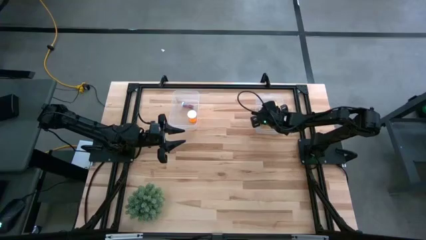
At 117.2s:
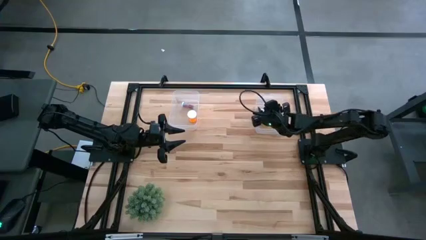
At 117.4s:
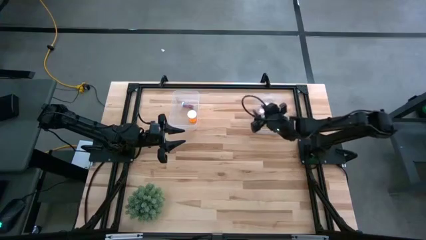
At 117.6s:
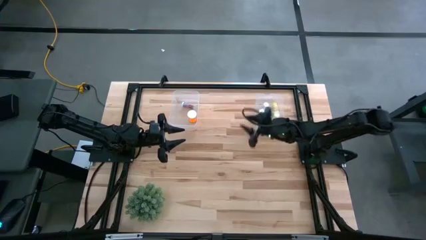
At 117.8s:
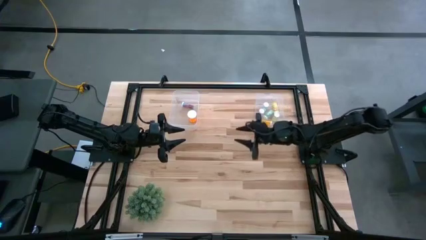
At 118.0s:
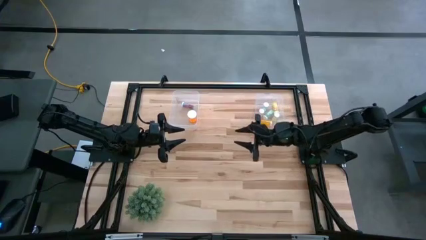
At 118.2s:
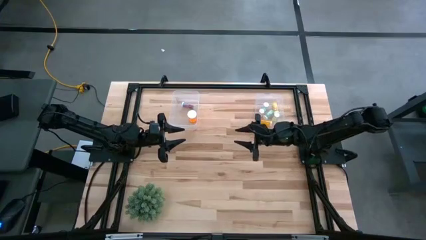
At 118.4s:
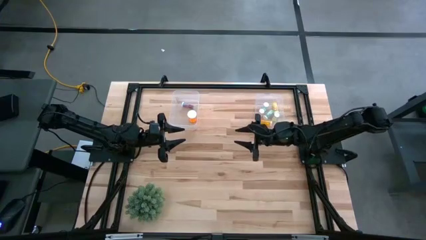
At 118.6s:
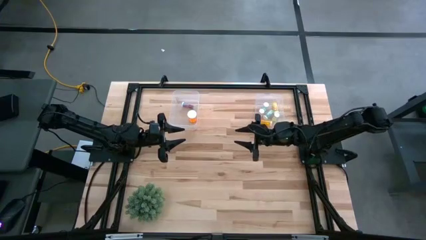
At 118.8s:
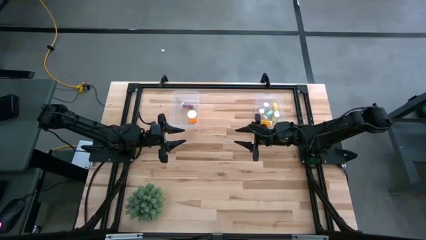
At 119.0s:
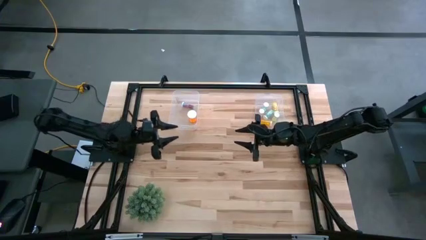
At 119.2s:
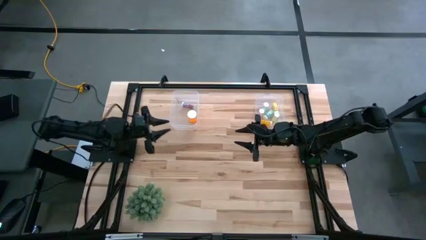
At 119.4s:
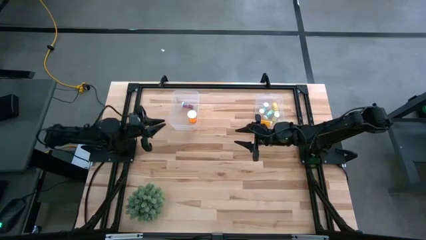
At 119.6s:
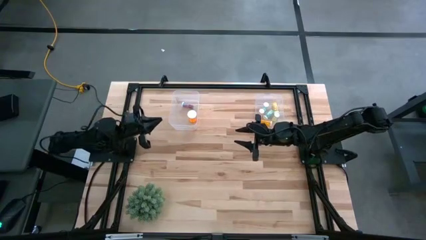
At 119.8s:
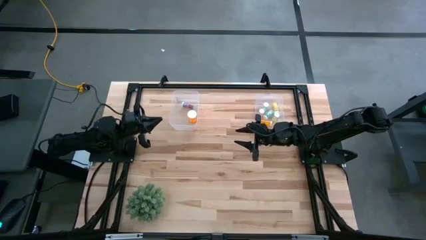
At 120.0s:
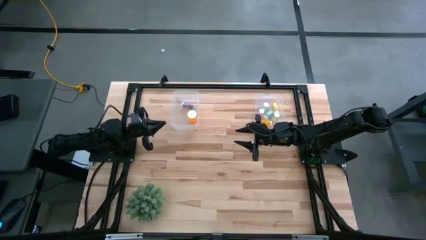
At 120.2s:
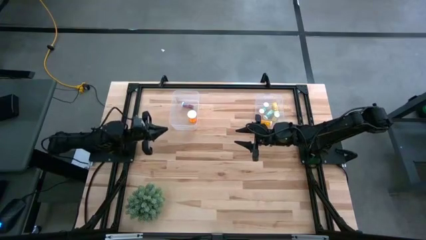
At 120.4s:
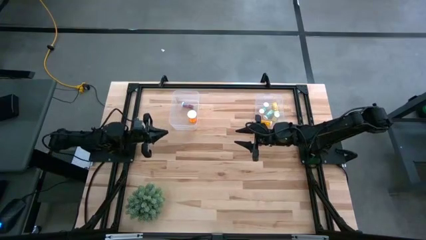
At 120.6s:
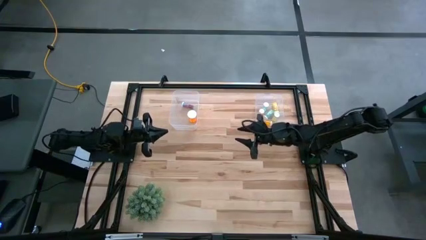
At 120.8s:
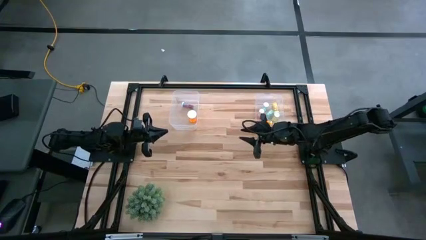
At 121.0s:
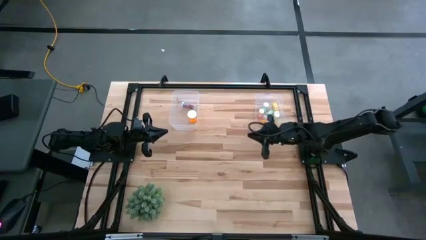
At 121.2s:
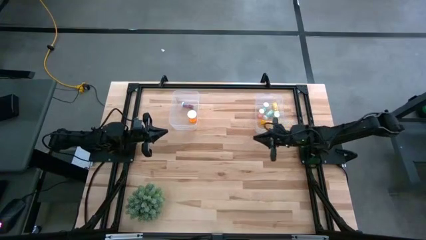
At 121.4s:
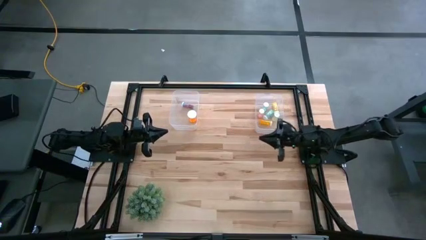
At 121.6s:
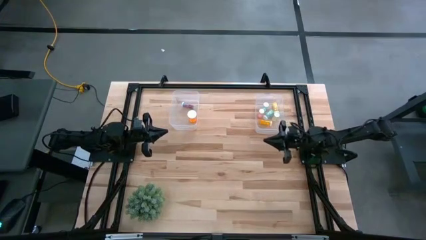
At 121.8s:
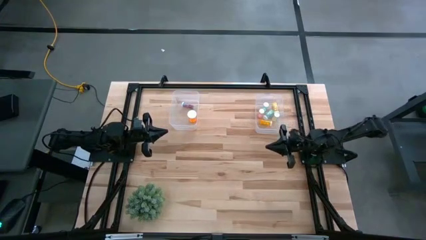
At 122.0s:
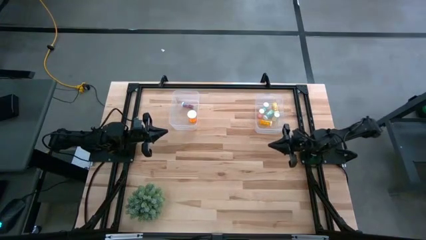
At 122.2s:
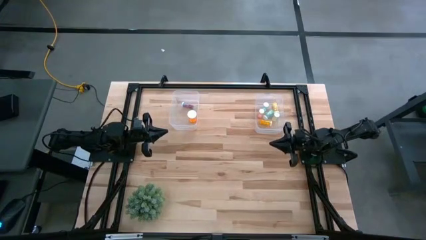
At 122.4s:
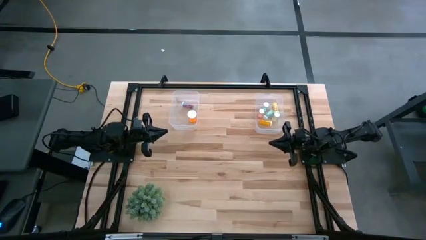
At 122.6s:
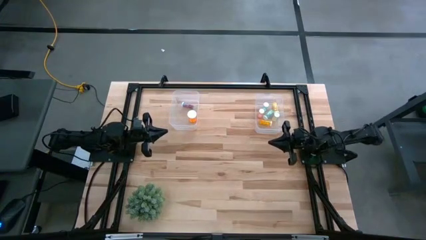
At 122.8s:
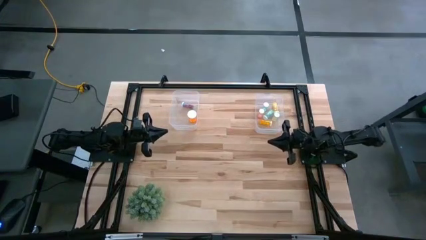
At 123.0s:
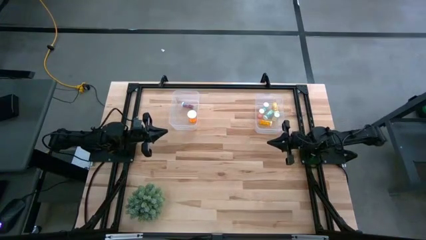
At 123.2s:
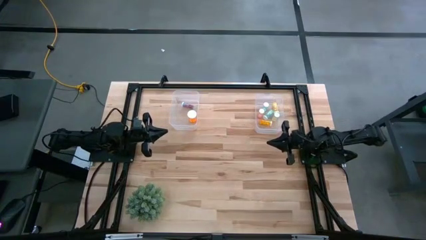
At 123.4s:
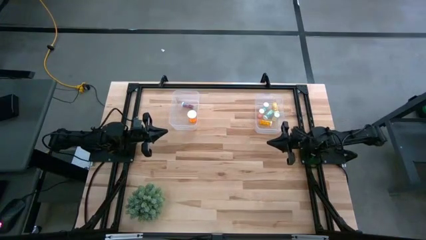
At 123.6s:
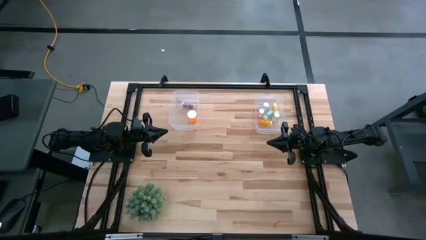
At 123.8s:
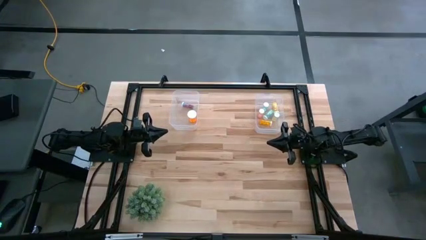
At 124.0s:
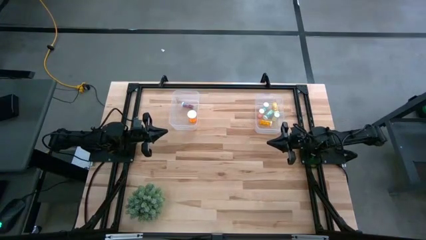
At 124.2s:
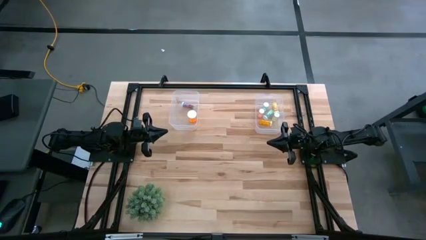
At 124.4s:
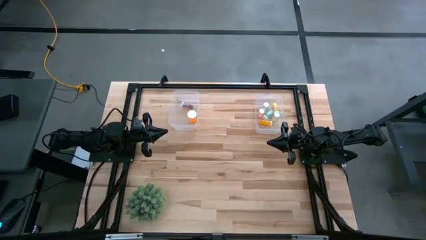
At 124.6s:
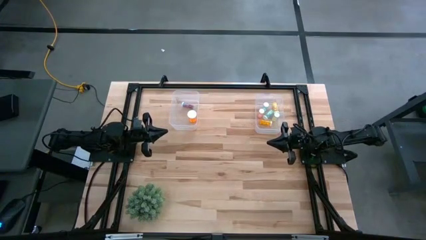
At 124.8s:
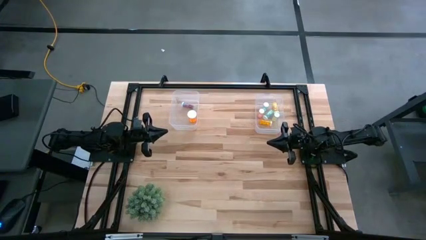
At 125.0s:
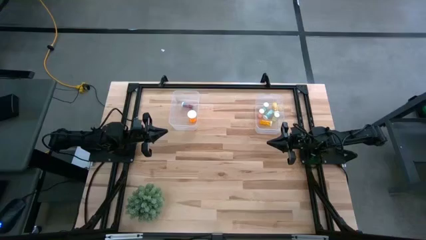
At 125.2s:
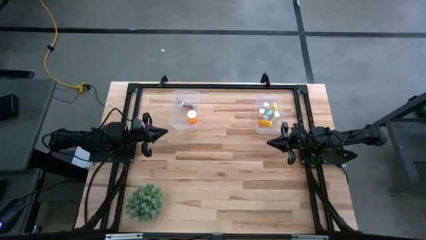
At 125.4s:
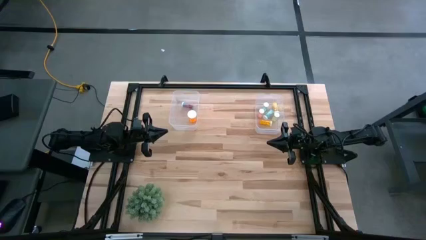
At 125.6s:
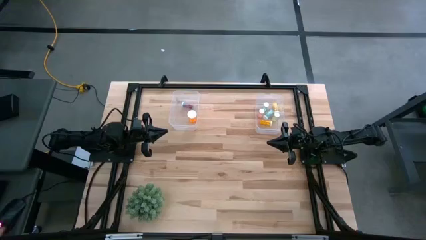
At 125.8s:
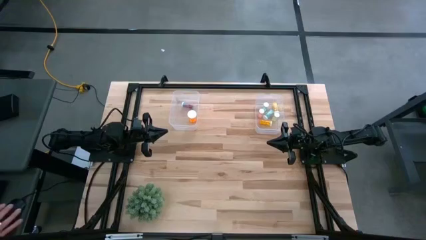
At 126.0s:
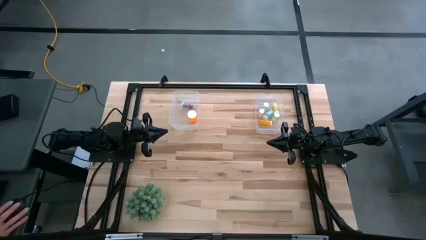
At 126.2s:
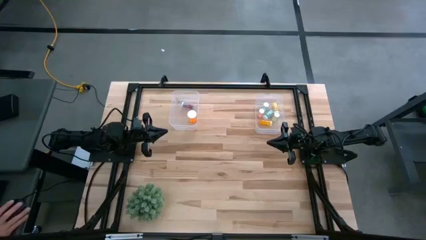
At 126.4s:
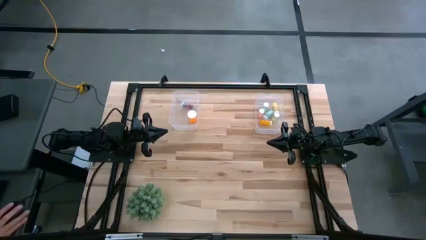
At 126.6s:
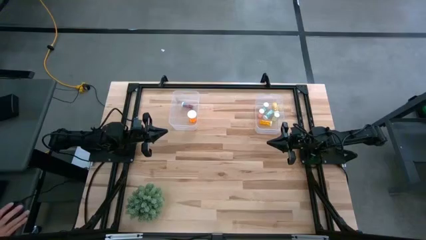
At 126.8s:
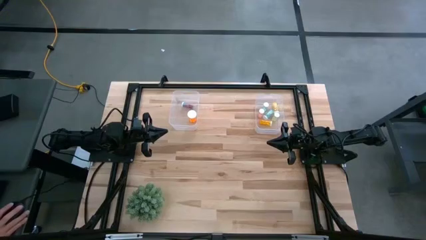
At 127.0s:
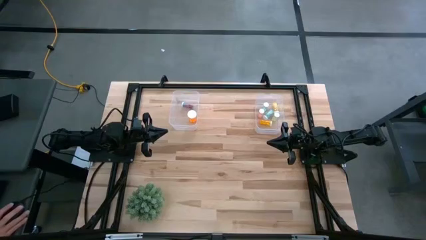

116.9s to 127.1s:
Task: Pick and place medicine bottles into bin by pill shape (circle, oval)
Return to Home Position

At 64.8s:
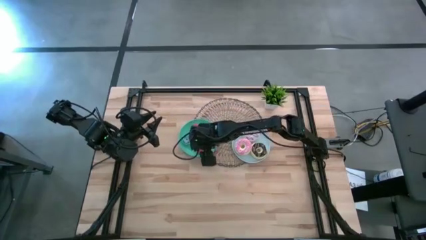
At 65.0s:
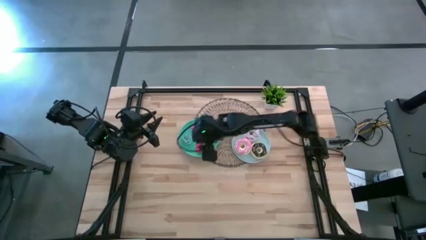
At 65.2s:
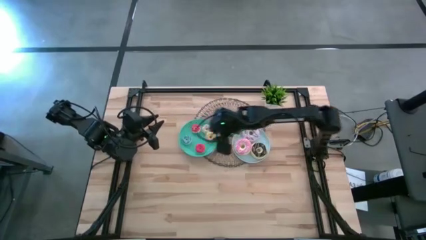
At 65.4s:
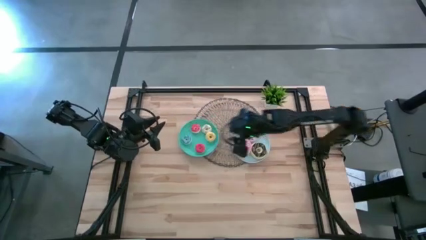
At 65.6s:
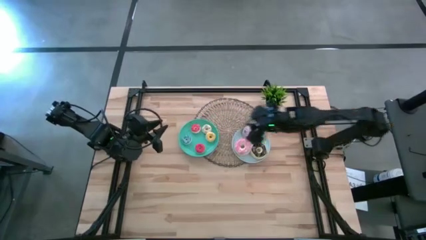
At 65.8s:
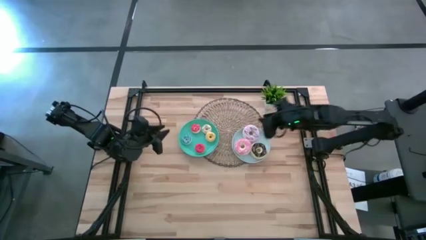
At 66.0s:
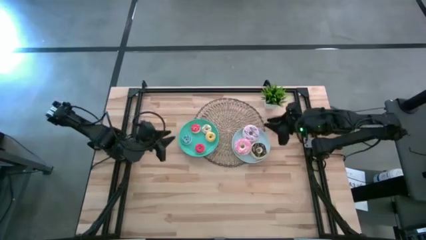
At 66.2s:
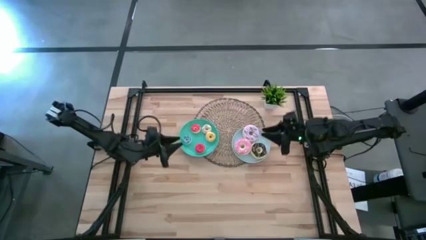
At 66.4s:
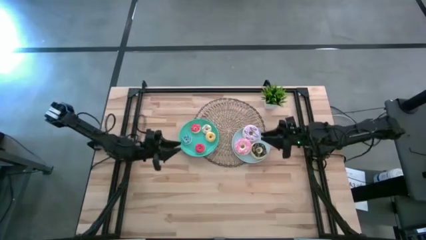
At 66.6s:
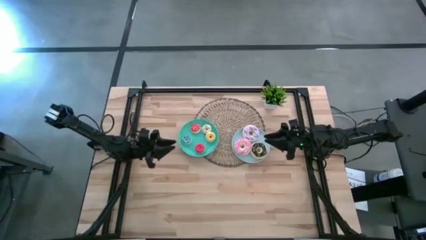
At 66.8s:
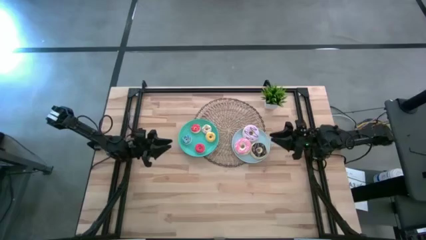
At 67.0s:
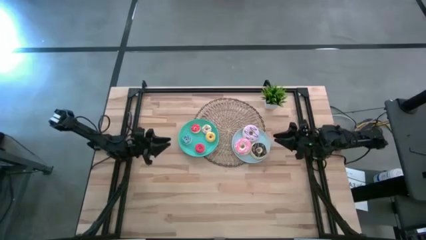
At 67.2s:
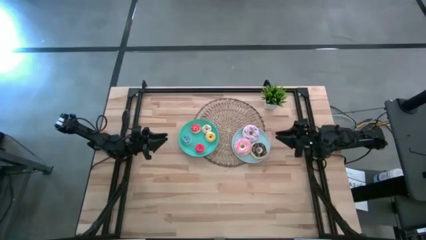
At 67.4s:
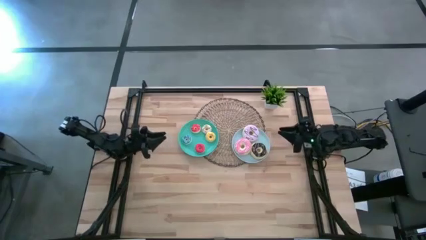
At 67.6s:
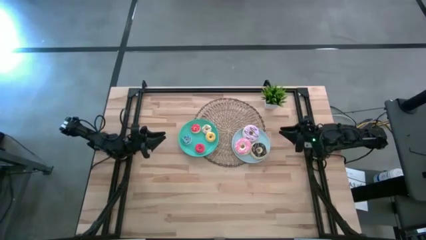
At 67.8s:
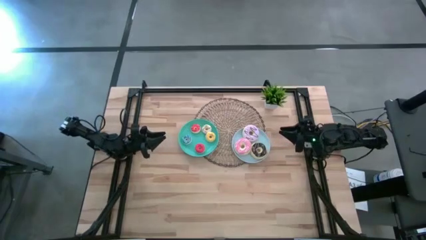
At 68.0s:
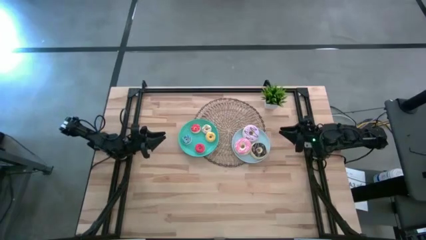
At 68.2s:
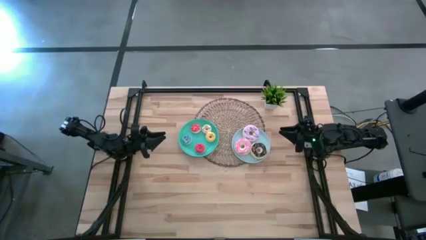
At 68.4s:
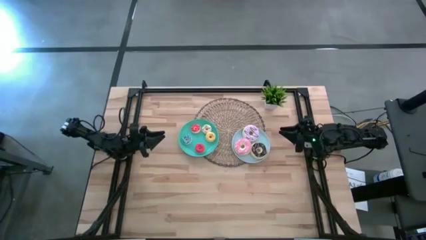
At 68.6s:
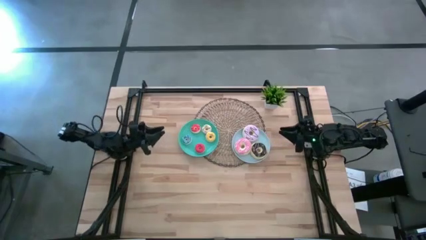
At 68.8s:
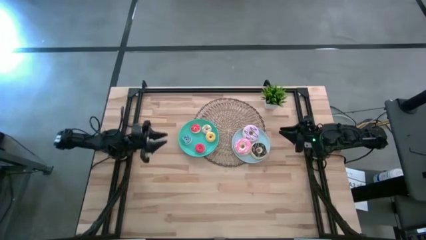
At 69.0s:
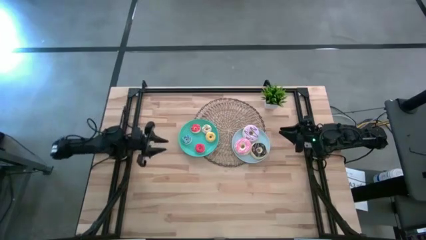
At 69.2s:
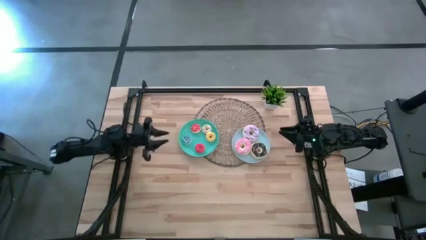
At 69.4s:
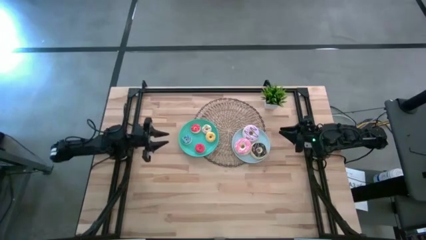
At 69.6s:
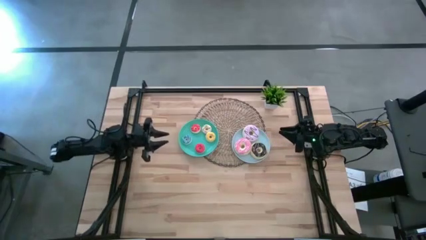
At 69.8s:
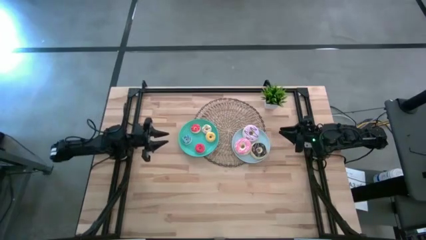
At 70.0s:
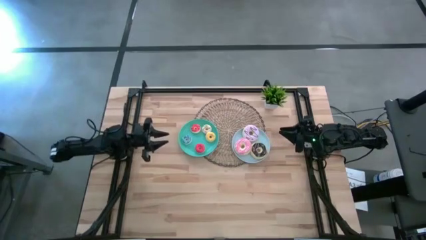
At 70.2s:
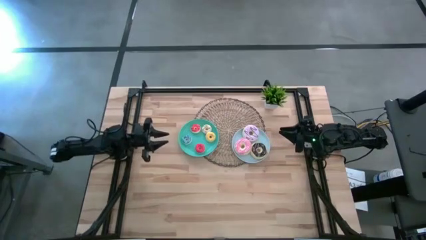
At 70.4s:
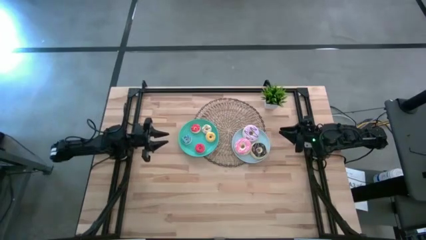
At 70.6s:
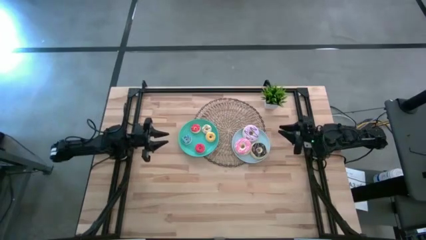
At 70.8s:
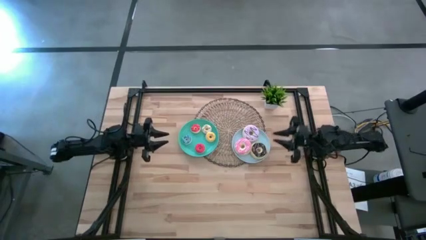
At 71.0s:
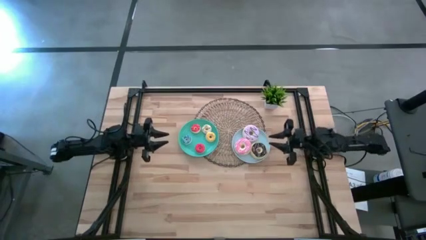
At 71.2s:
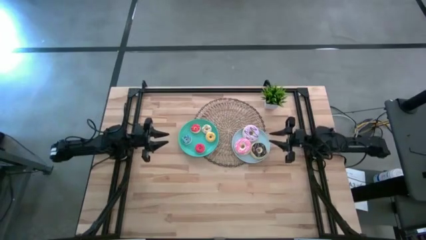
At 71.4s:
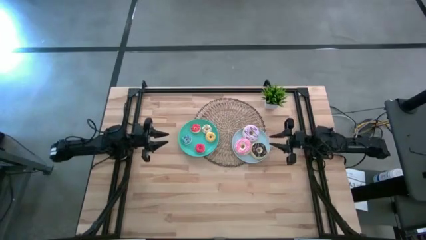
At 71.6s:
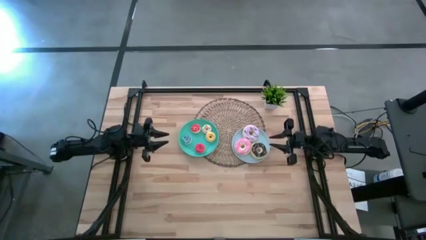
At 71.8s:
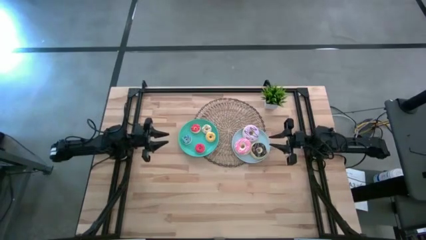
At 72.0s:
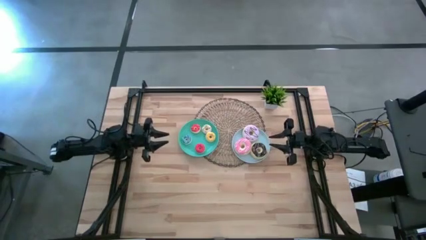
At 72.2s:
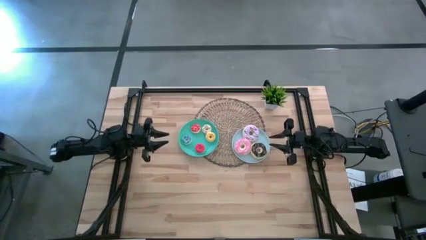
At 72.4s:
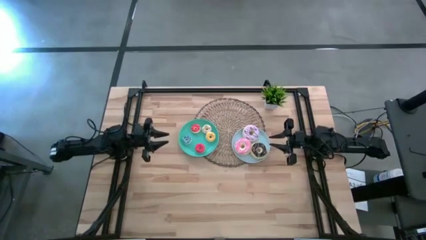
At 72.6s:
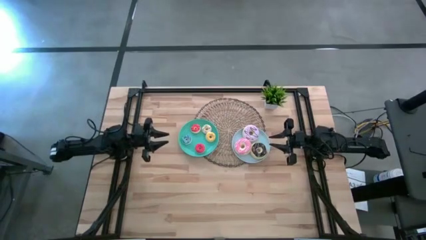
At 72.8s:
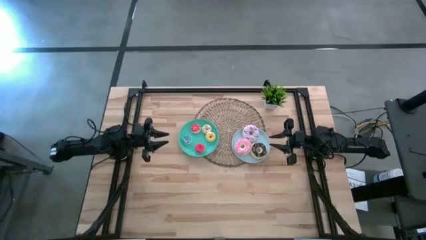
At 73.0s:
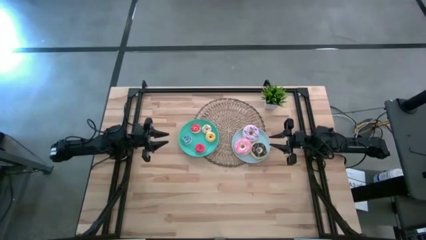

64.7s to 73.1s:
Task: Pick & Place donuts
Return to Home Position
